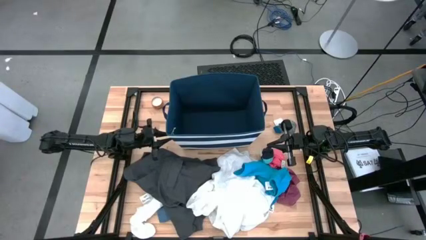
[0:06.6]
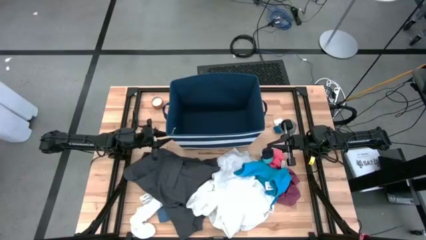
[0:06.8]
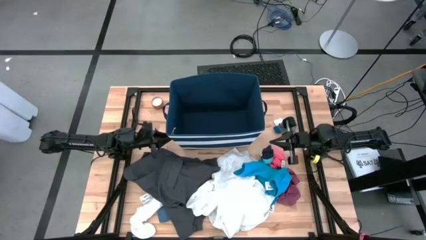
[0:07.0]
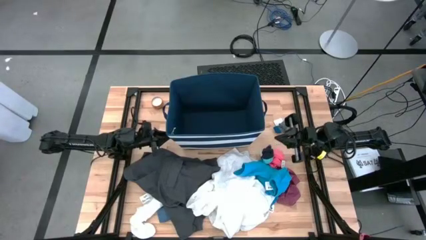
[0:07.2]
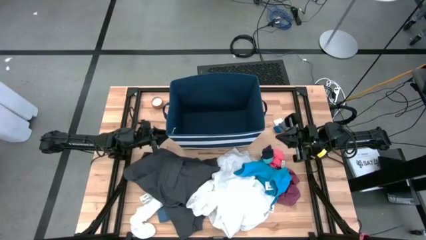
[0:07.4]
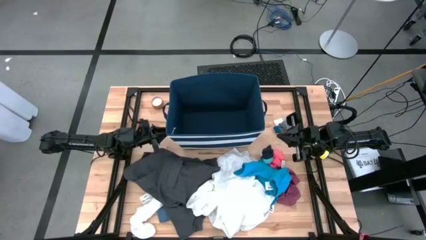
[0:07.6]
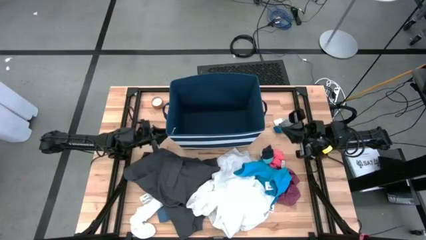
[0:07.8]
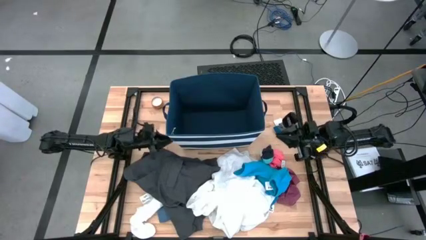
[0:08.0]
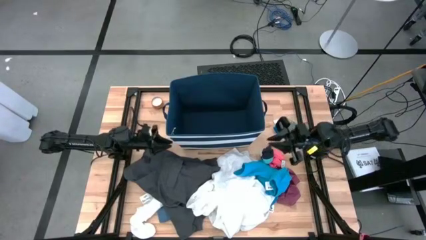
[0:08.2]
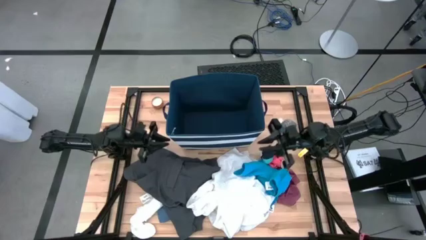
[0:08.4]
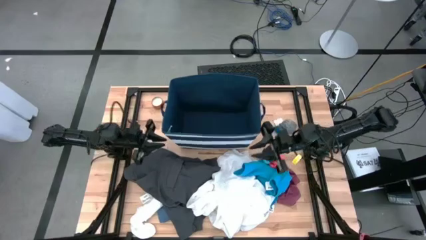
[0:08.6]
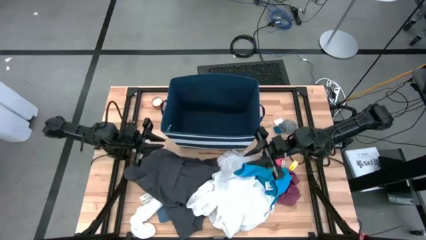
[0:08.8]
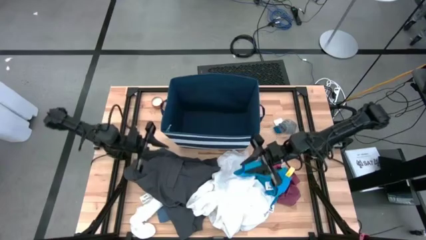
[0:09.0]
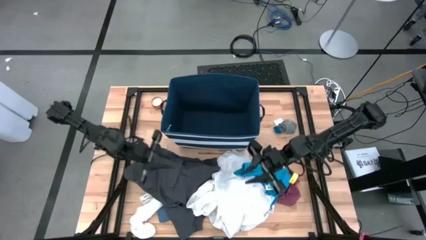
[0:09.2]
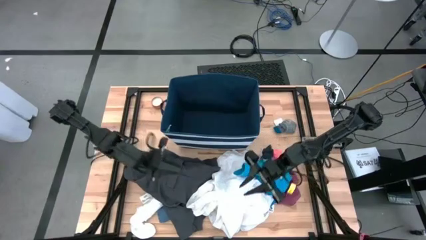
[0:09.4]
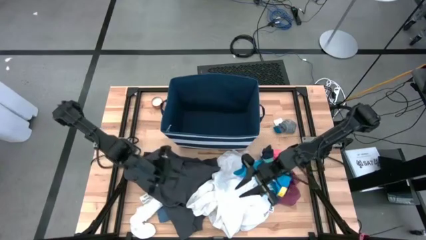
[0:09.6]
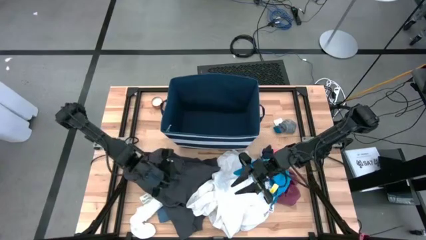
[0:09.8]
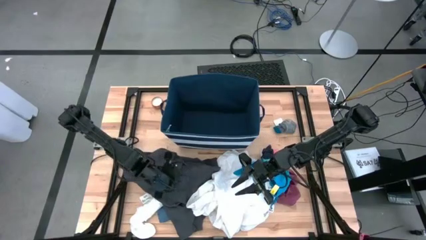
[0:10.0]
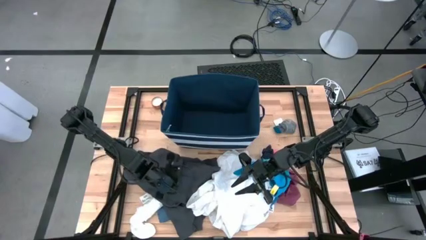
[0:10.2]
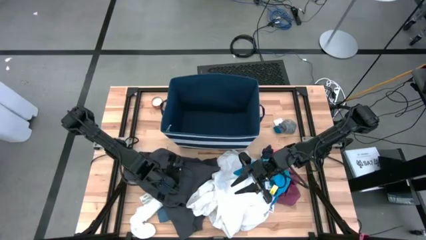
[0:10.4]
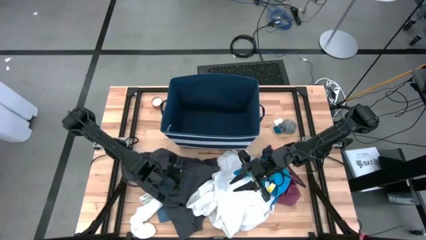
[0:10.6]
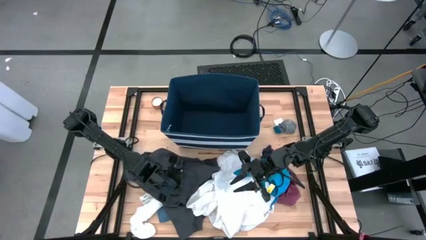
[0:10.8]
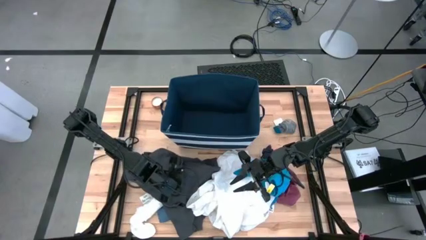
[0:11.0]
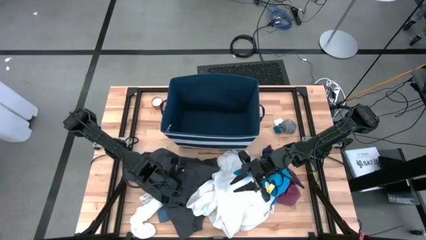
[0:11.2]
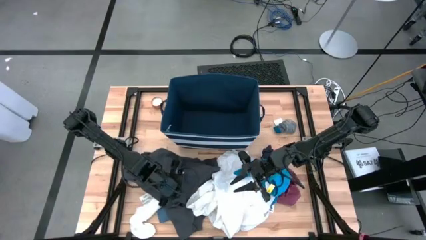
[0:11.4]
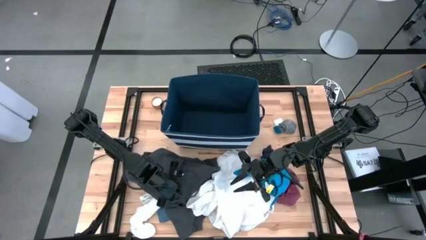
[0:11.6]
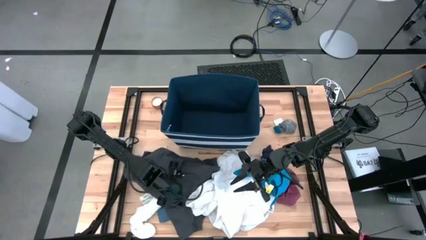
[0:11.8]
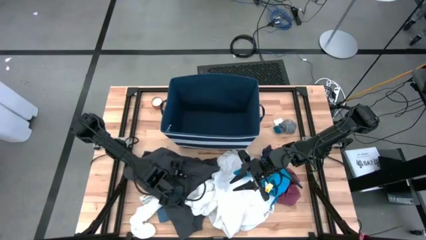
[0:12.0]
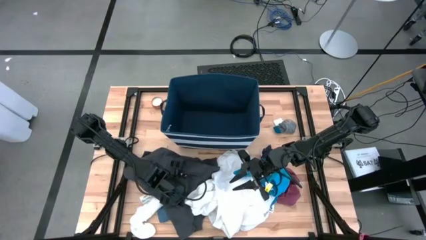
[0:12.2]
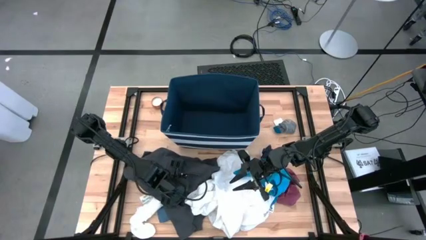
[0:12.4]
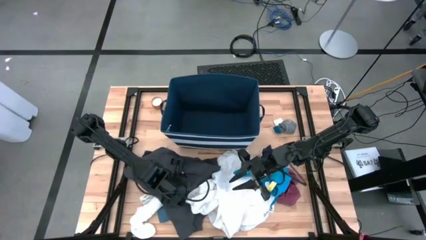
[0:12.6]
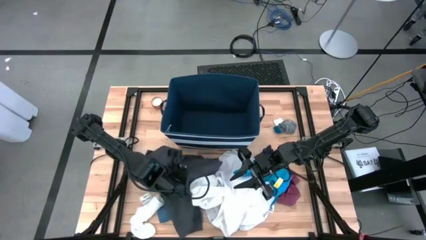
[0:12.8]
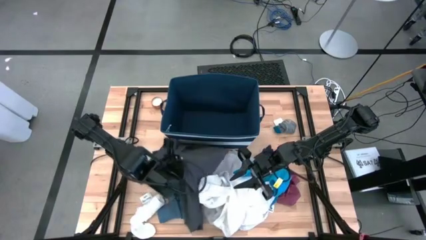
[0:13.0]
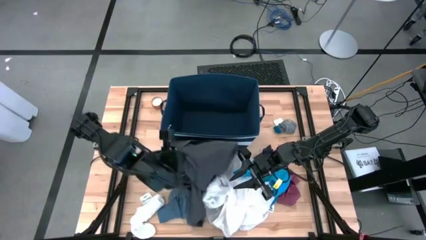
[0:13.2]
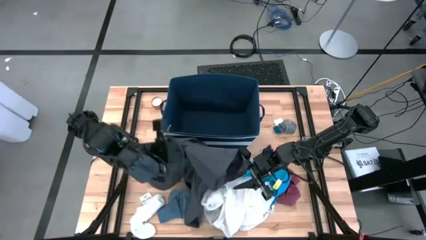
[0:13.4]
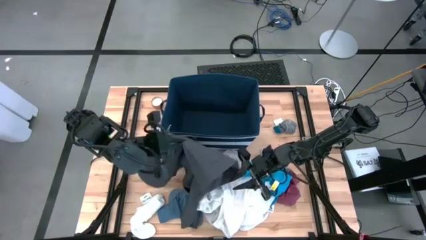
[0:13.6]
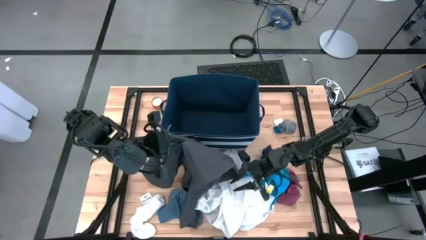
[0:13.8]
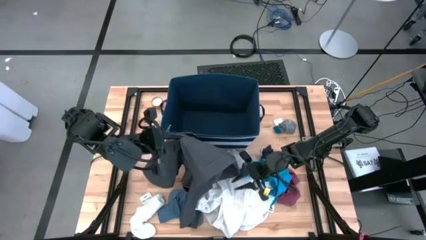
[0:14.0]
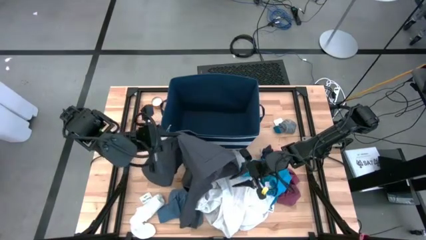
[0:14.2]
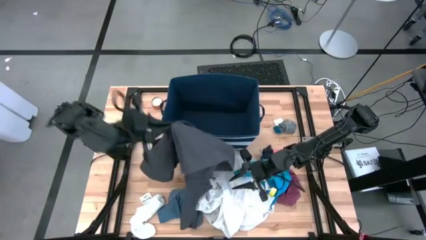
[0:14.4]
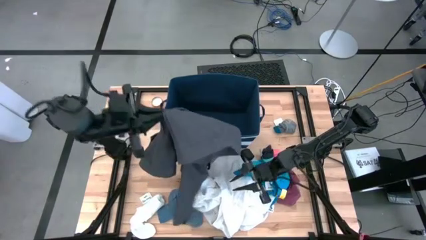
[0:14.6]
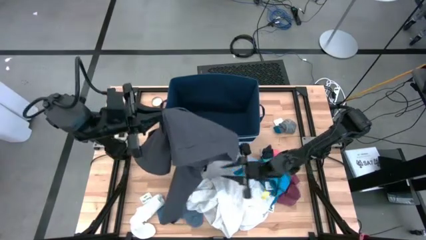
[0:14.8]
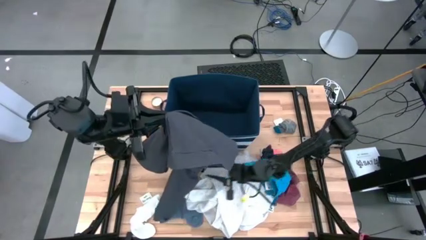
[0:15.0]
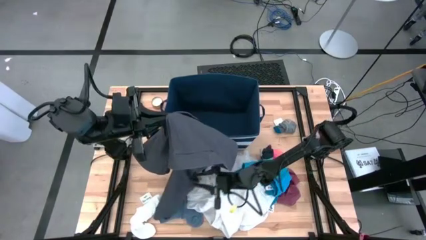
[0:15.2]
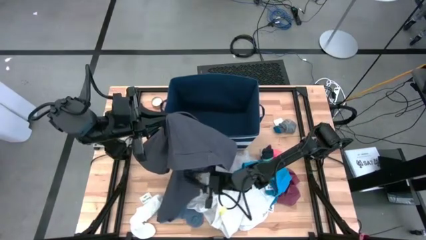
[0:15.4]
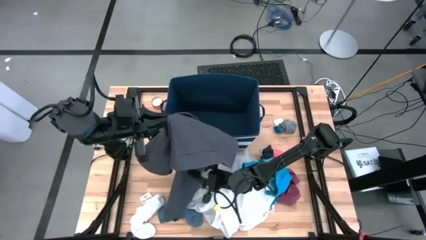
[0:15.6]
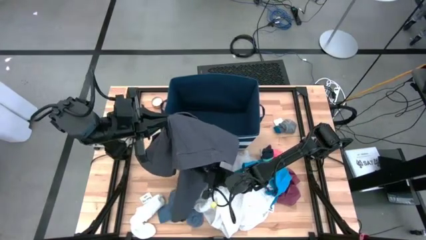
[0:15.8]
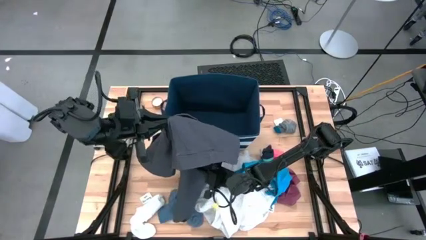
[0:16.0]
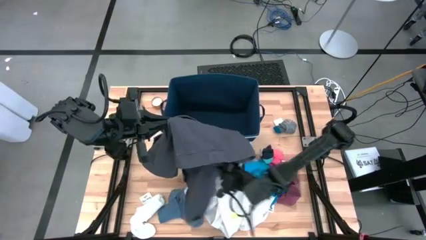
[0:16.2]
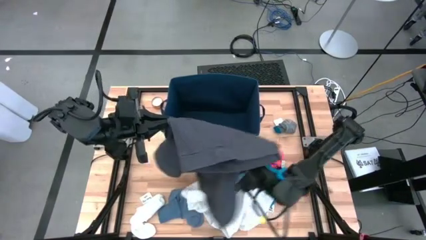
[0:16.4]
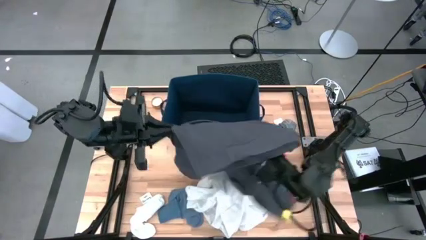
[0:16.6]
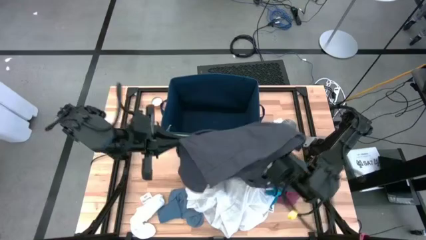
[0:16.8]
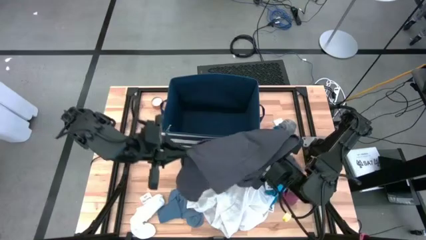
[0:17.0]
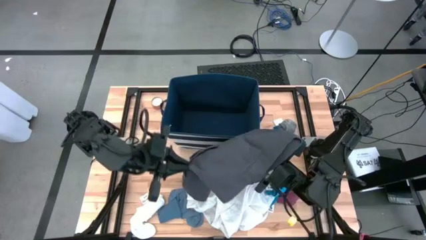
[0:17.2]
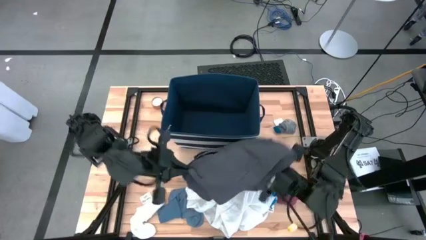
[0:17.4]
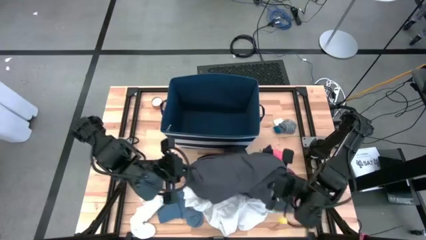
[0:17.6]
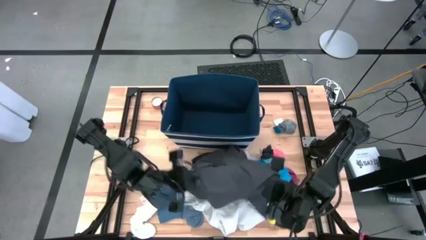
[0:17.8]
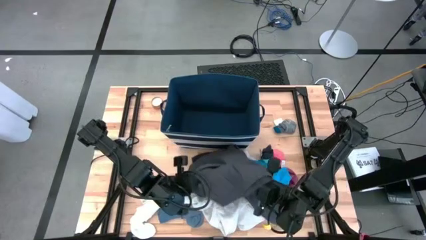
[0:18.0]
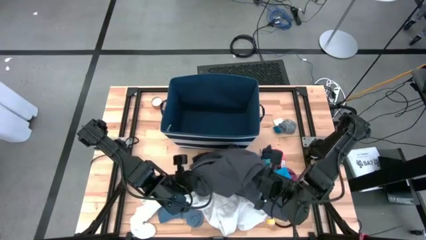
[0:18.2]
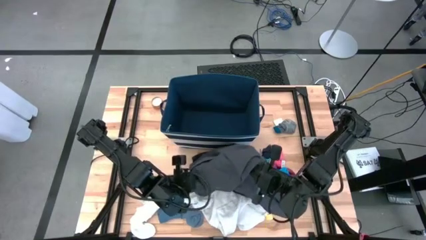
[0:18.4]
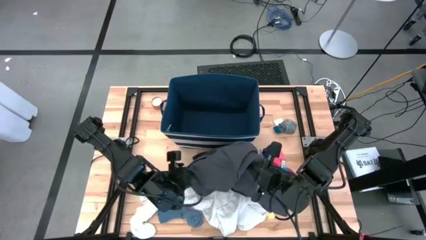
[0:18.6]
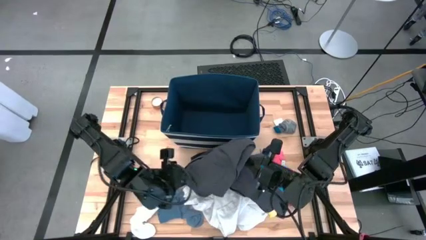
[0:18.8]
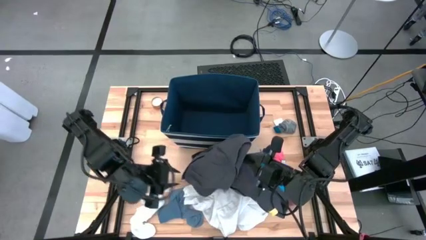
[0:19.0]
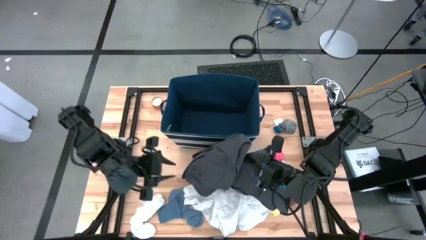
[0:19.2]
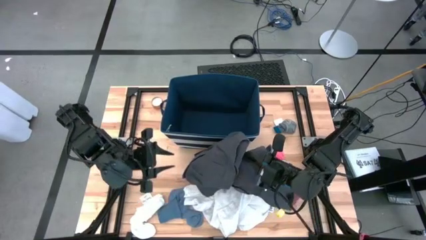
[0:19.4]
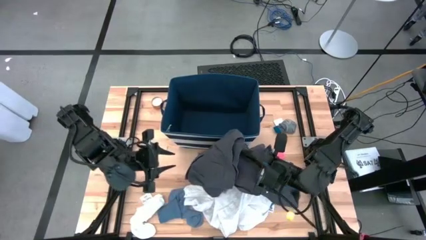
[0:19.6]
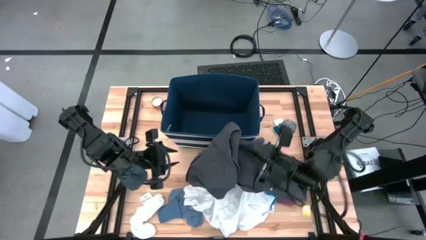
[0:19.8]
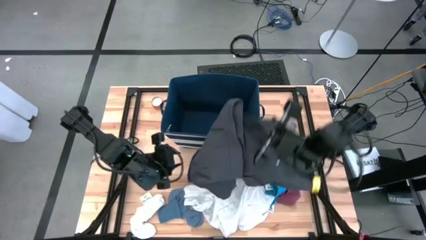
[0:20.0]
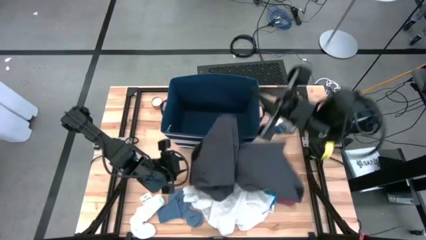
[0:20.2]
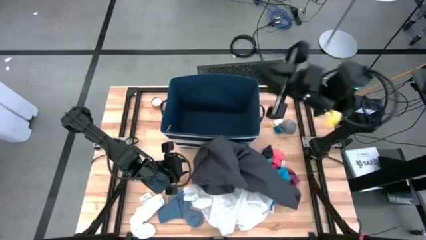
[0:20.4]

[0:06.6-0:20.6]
Task: Sort clothes
Put the gray short into the white and blue laundry organizer
